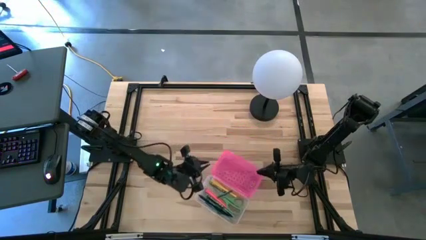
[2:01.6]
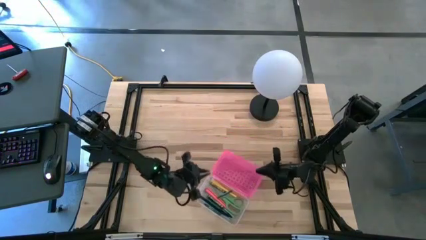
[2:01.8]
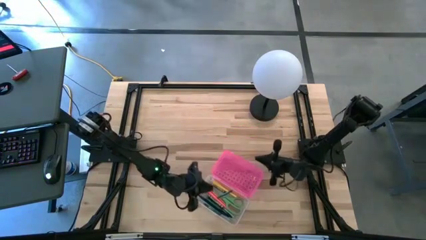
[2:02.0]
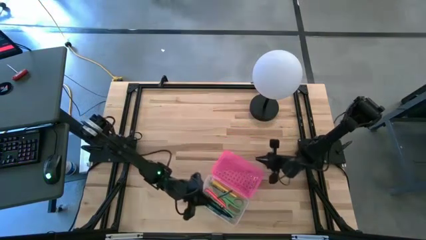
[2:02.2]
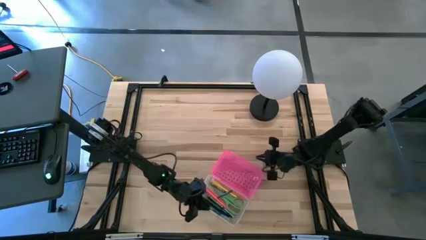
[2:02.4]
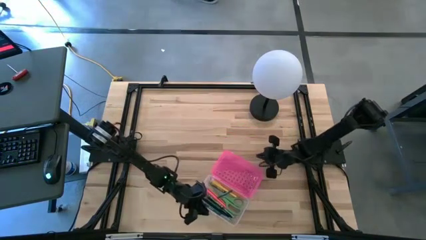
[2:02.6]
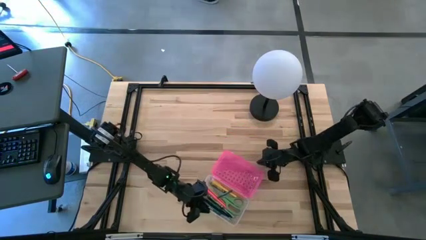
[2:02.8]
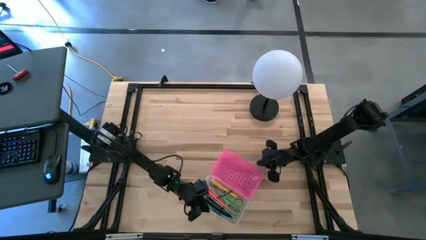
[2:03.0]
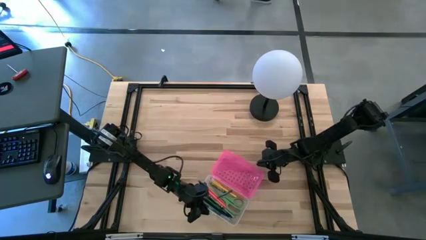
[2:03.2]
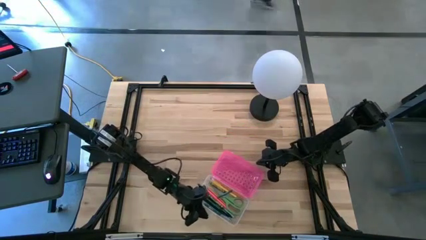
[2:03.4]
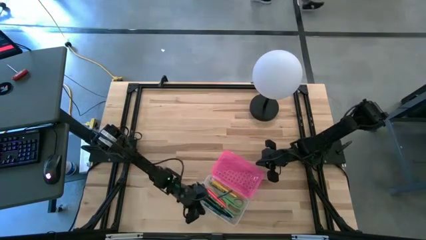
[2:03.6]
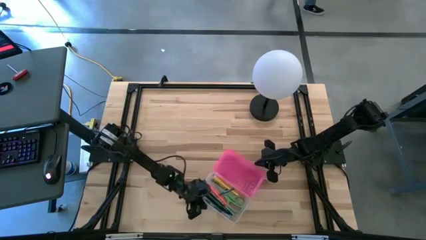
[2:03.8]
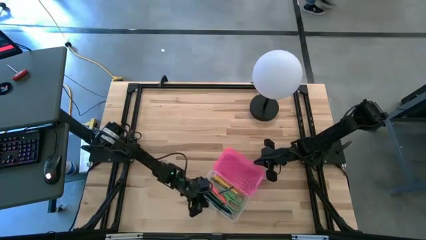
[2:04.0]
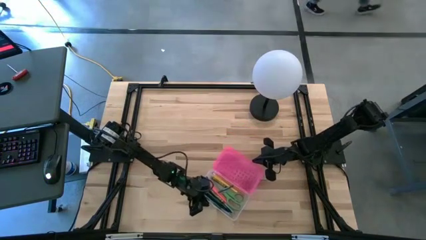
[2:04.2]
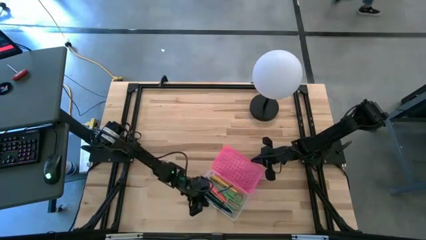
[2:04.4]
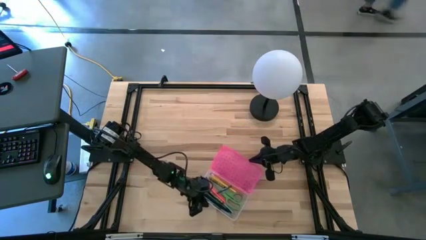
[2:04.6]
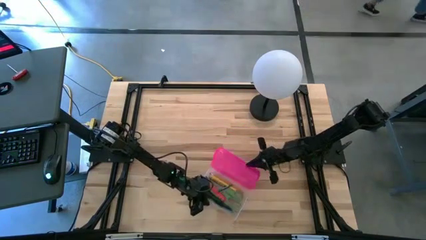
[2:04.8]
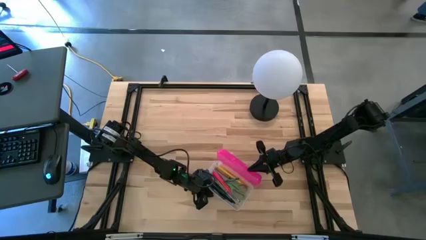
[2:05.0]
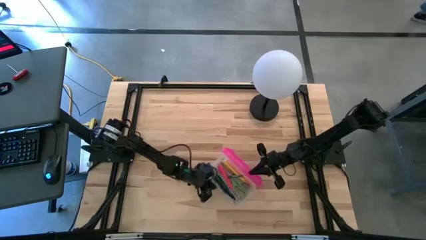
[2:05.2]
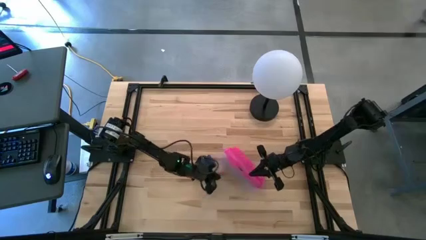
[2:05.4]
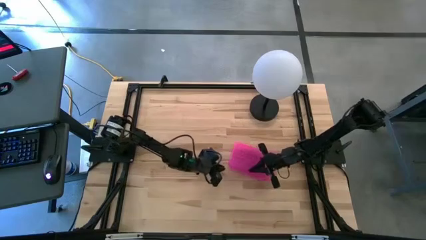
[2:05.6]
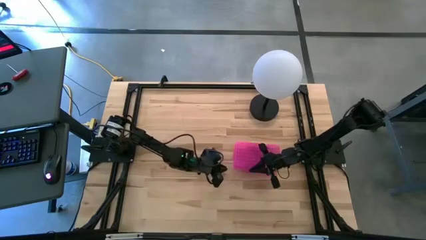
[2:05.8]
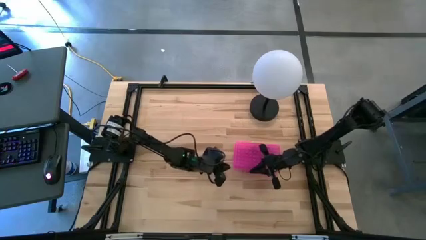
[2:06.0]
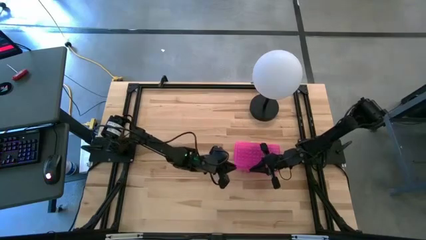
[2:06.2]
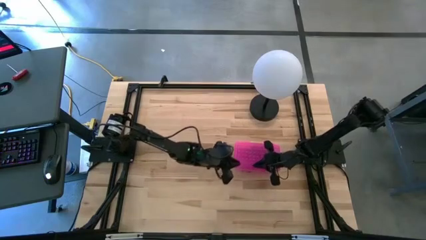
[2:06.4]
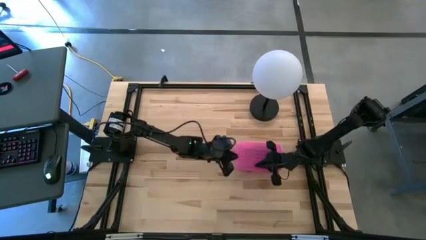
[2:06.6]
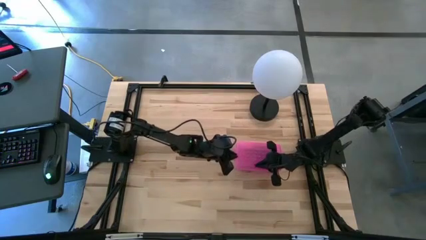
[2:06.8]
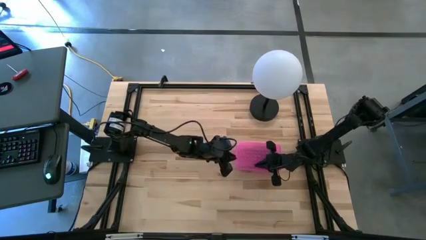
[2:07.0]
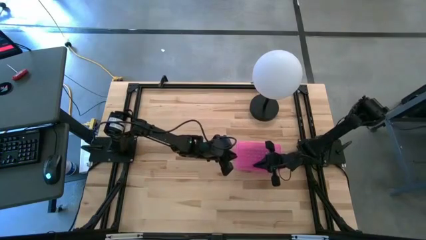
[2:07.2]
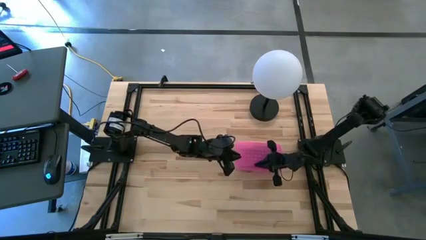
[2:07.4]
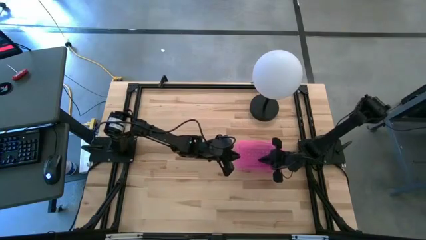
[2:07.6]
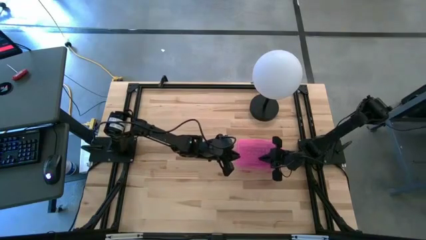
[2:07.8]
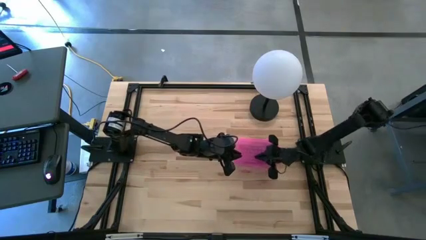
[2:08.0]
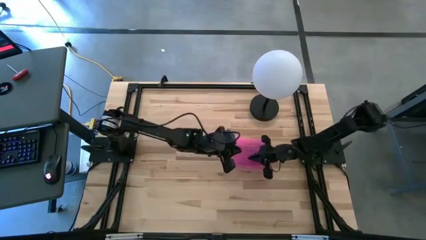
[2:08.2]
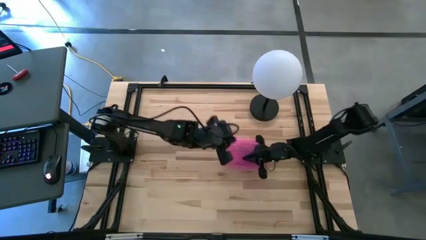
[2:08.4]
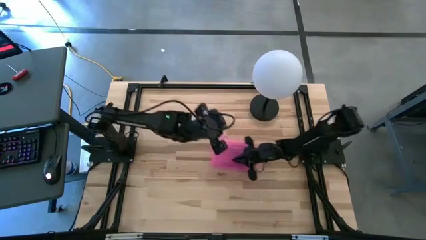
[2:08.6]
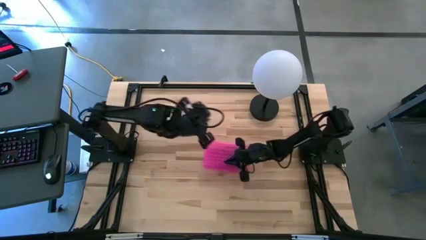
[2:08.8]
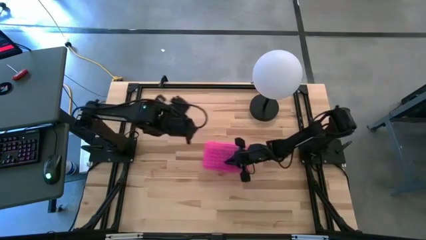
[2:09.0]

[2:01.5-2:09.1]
Task: Pick & place school supplies into a supply box
Close the transparent supply box

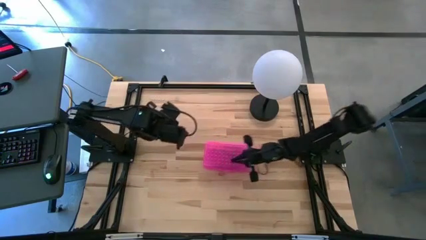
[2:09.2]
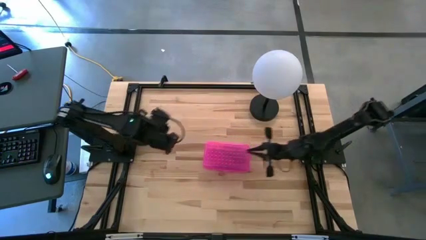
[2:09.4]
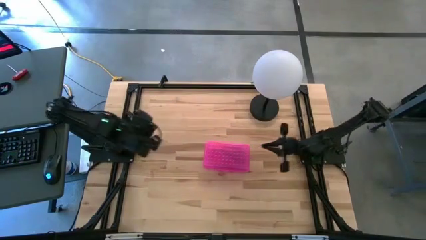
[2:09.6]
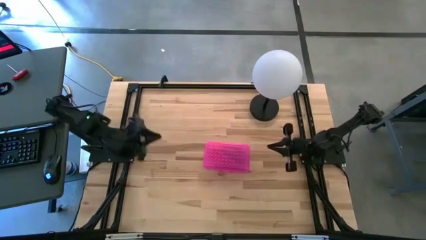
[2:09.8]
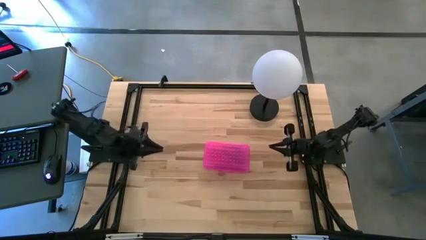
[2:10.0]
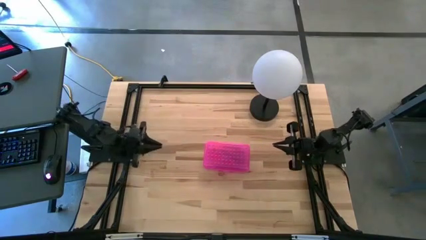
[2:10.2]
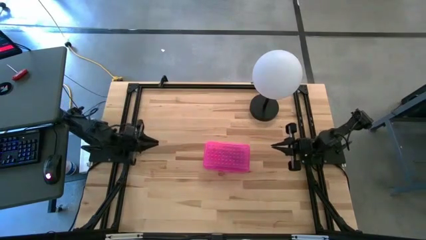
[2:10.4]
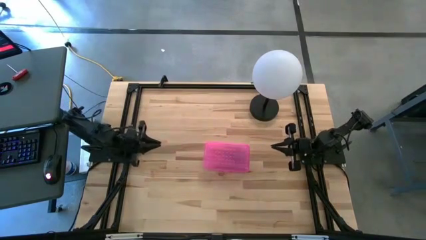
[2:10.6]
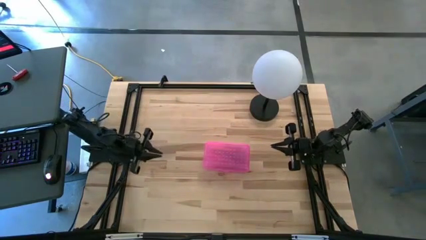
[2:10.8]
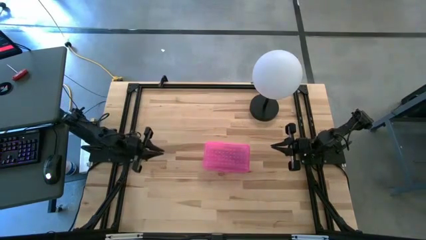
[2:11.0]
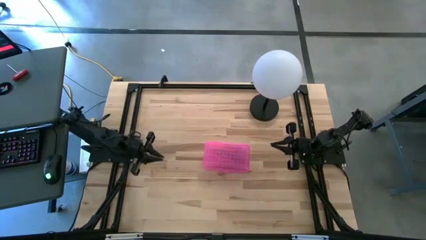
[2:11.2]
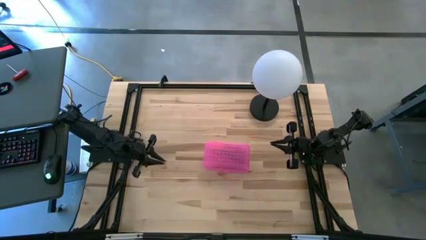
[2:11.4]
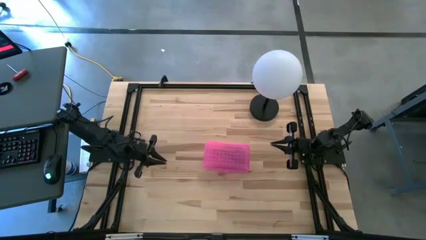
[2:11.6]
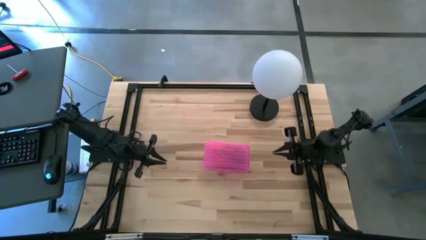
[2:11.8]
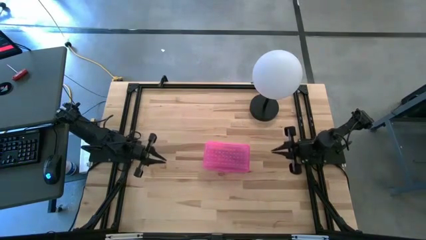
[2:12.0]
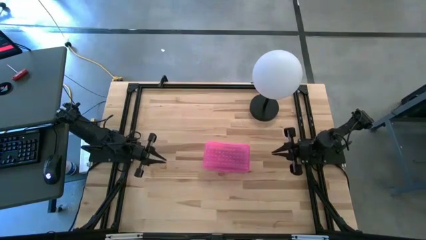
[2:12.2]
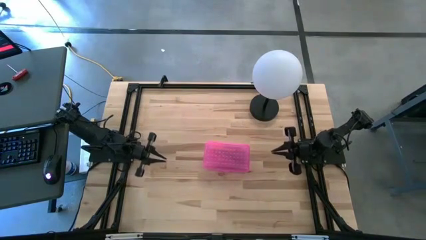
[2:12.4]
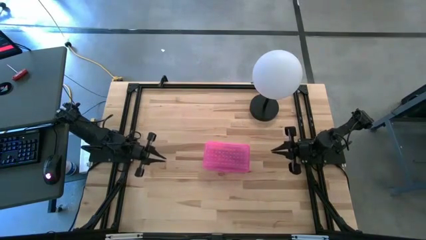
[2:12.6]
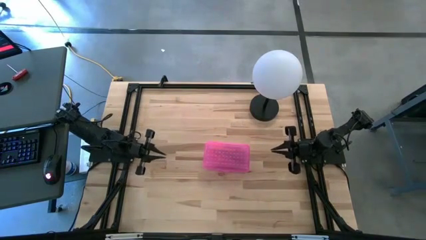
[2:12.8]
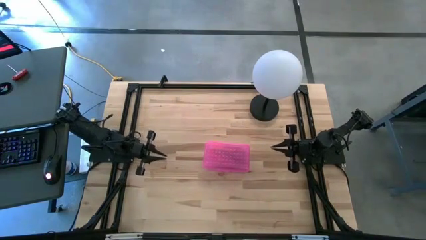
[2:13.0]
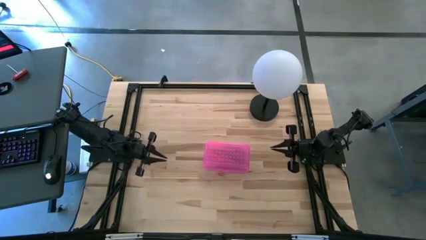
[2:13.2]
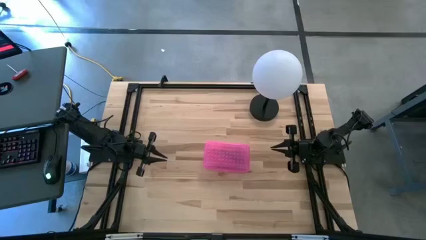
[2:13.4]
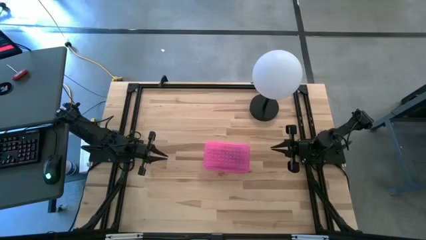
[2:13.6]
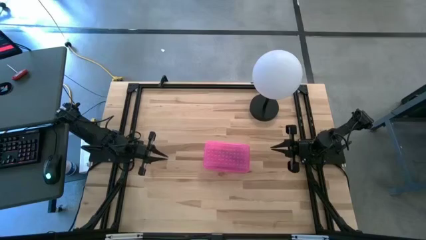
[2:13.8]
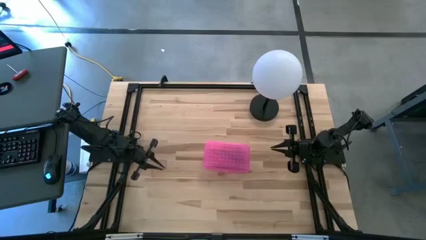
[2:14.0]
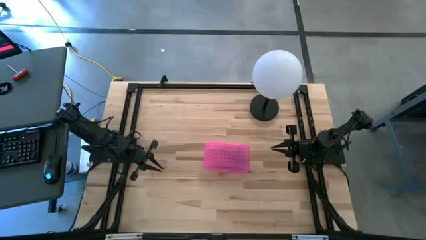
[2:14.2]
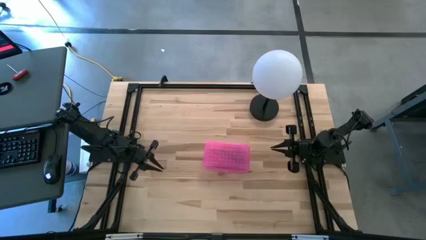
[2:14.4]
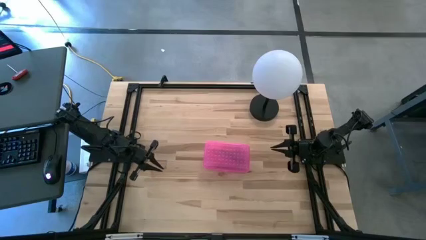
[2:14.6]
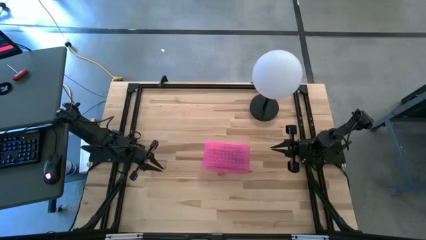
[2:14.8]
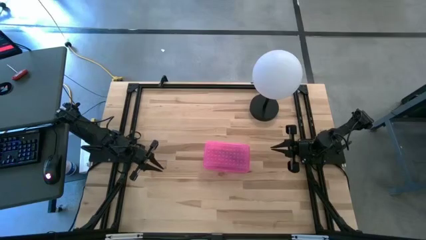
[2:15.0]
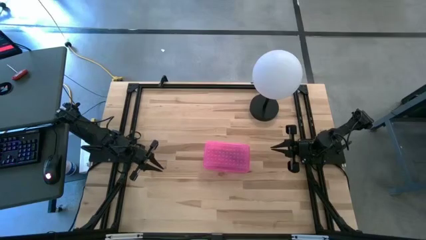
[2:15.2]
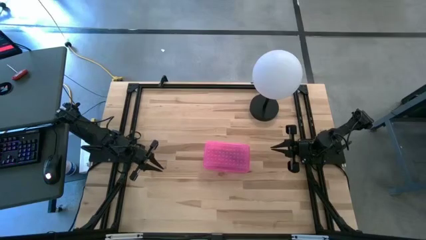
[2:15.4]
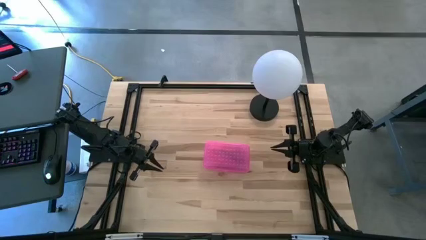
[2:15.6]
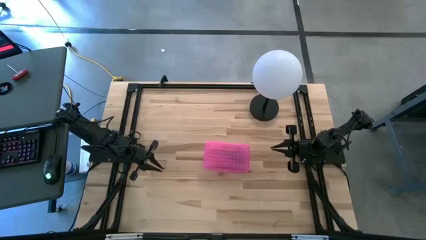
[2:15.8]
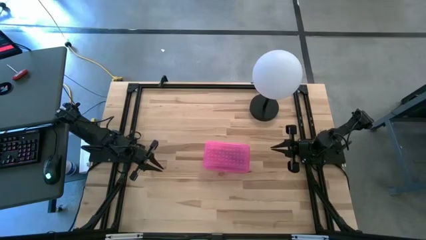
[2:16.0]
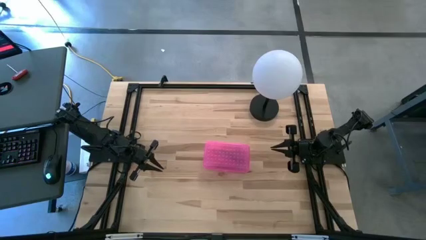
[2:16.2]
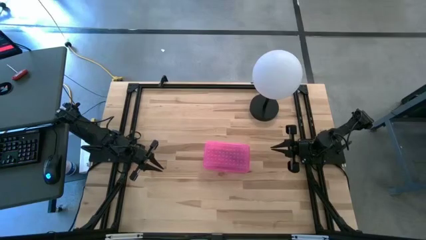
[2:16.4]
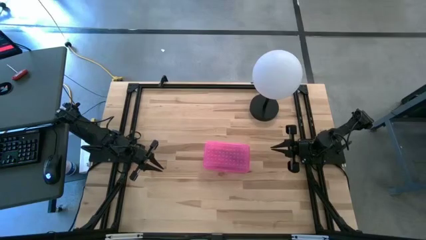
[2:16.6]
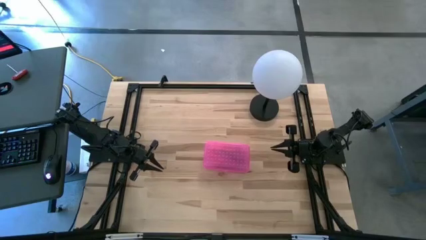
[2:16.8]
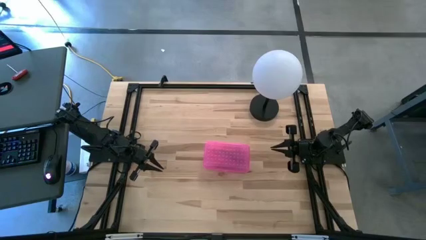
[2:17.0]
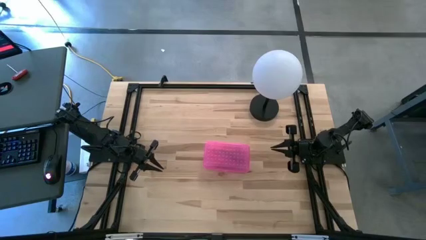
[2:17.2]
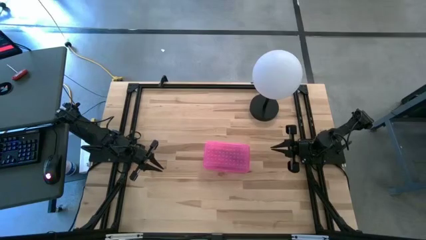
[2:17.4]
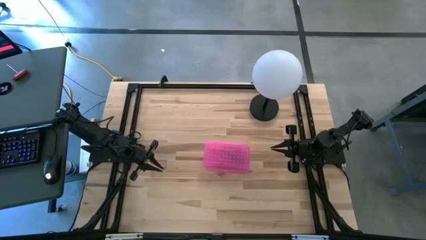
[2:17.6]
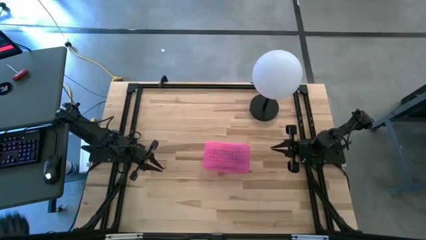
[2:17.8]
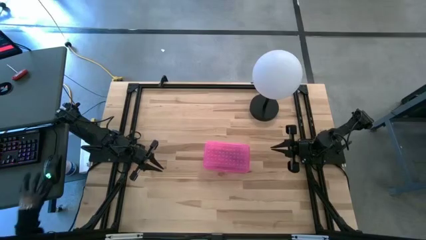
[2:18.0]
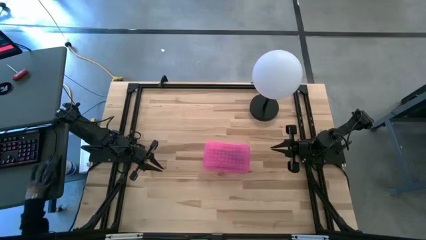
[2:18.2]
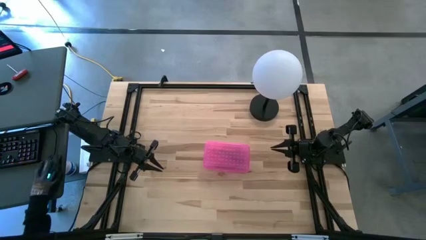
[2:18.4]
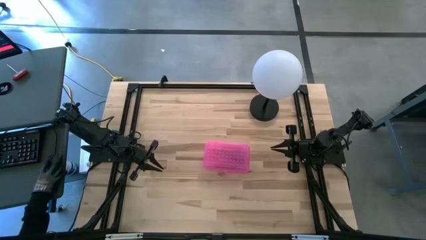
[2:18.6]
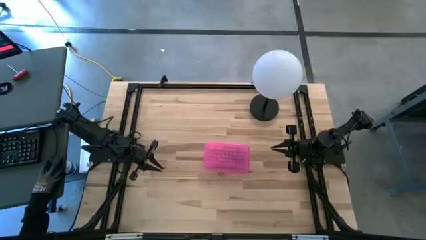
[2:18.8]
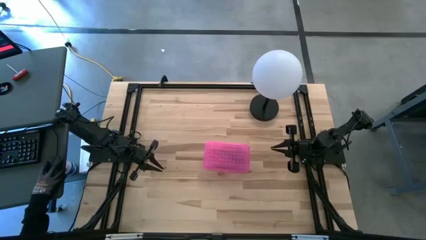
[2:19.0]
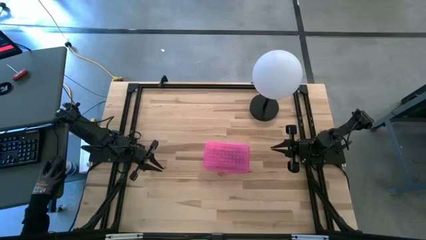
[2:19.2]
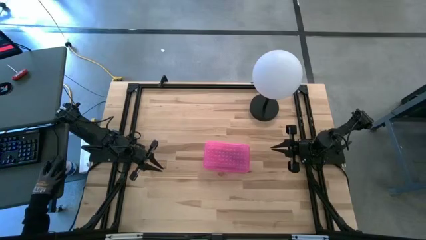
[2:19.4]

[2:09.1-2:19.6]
Return to Home Position

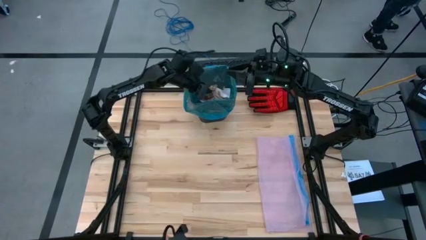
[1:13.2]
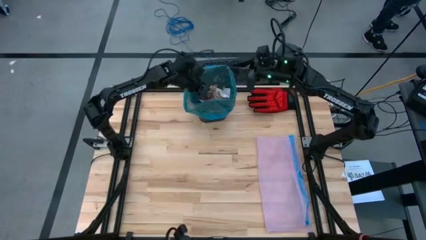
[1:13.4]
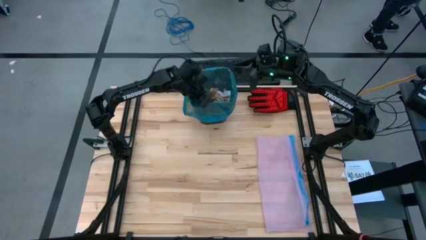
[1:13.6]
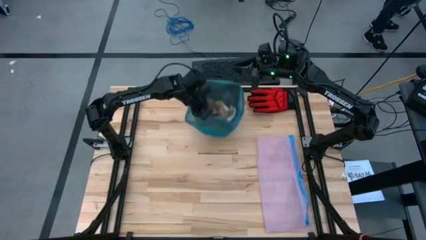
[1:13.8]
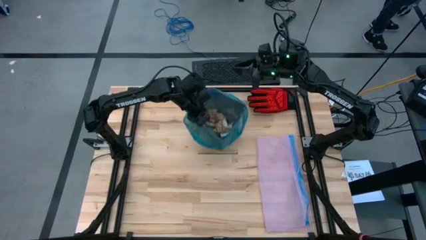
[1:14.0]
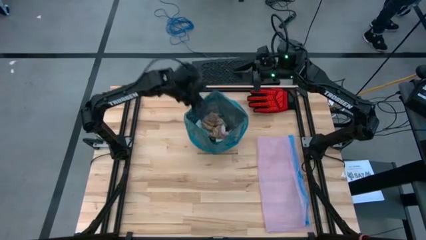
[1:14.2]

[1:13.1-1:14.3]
Task: place trash/remove bag and relplace
Adjust the trash bin
